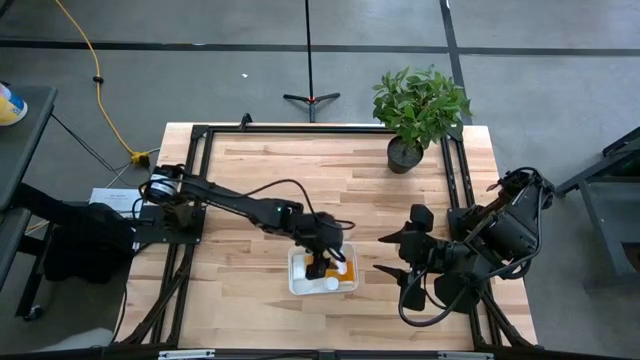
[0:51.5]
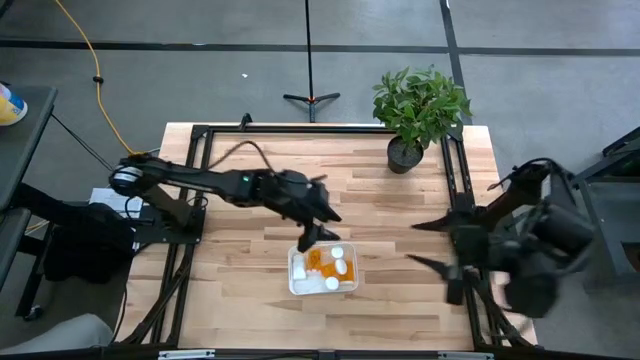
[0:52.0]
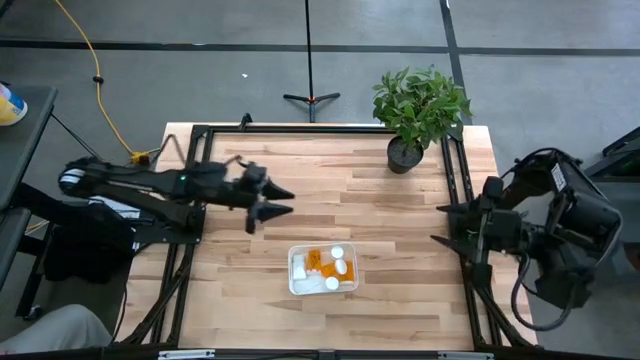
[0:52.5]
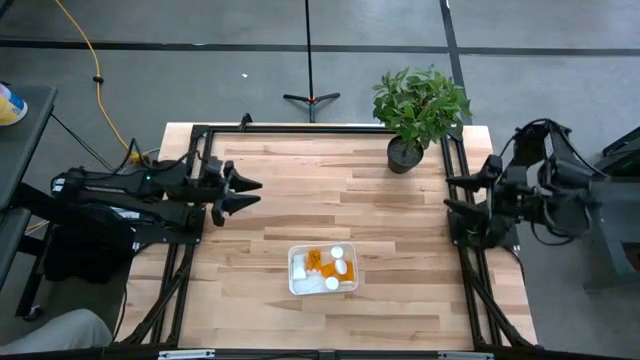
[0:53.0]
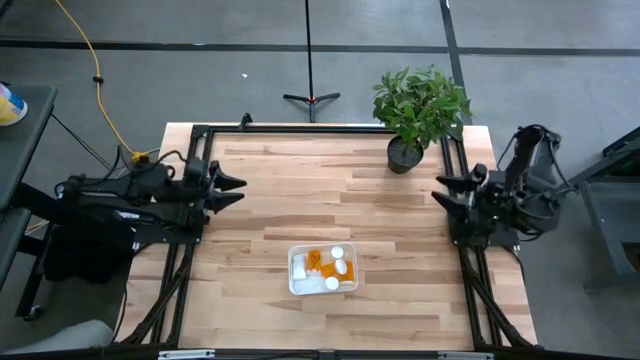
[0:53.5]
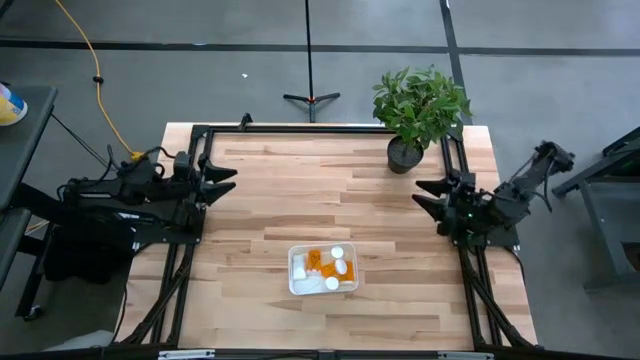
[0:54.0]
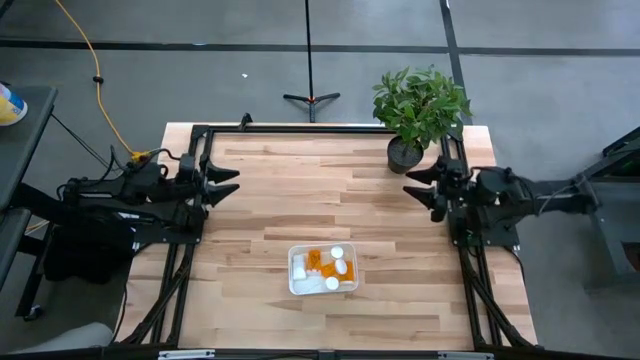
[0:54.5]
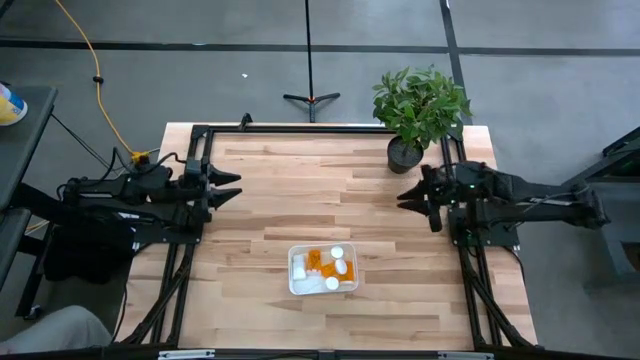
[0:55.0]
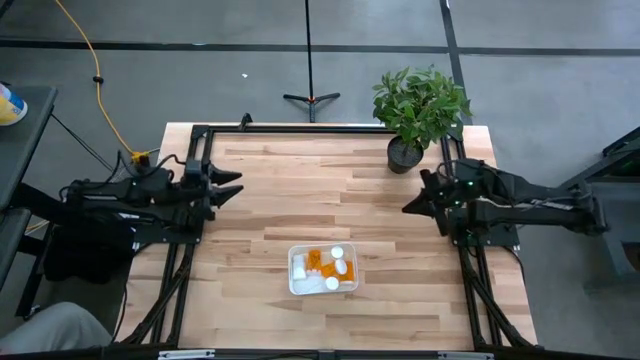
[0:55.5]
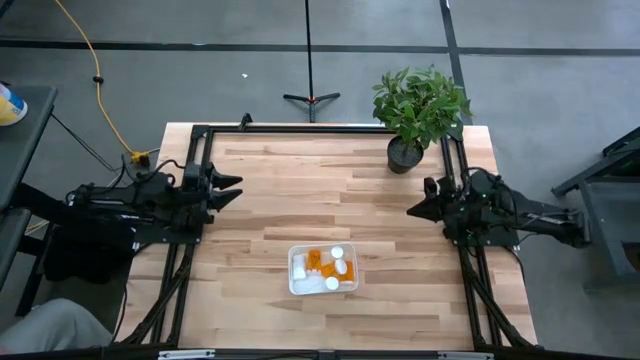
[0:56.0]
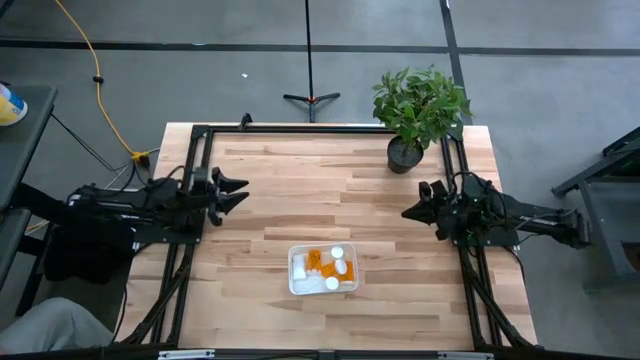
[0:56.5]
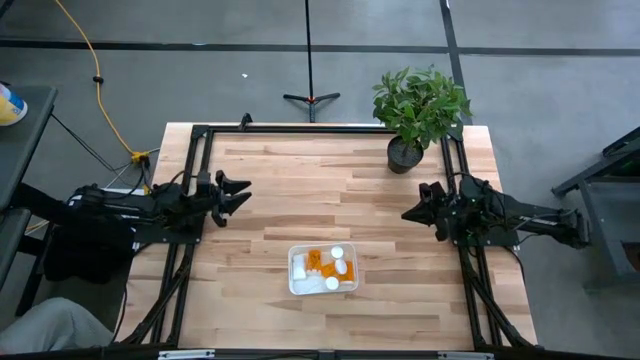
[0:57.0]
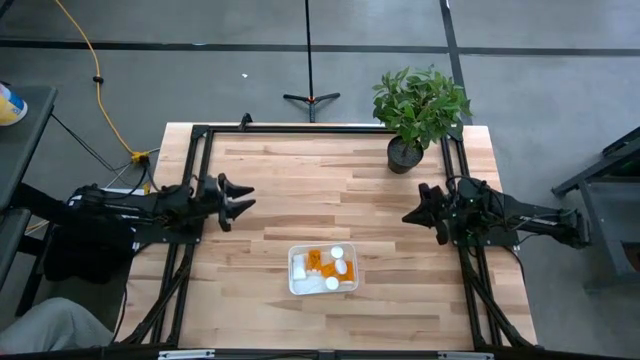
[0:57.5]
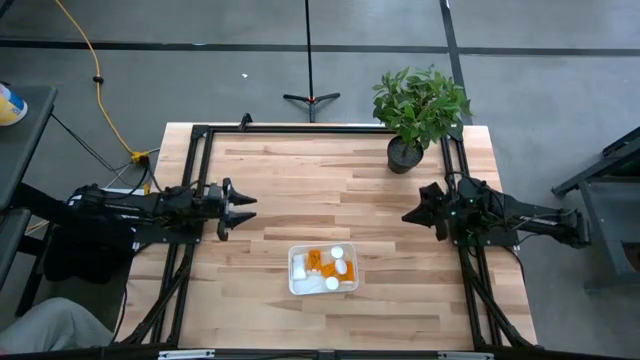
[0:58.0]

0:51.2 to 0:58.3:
Task: Pick and place pill bottles into a basket
Return to Home Position

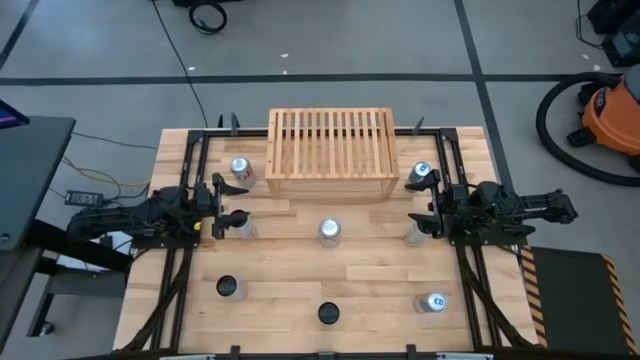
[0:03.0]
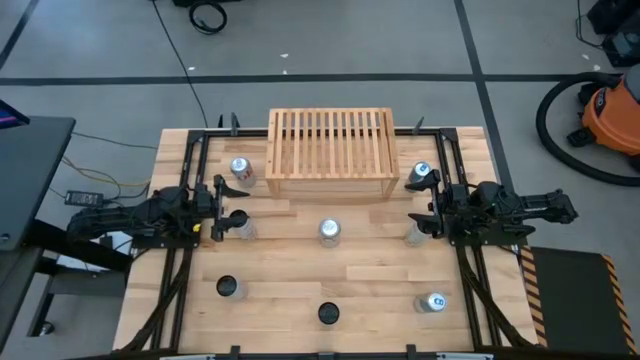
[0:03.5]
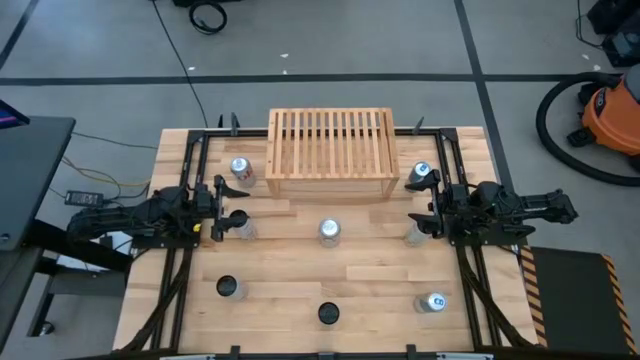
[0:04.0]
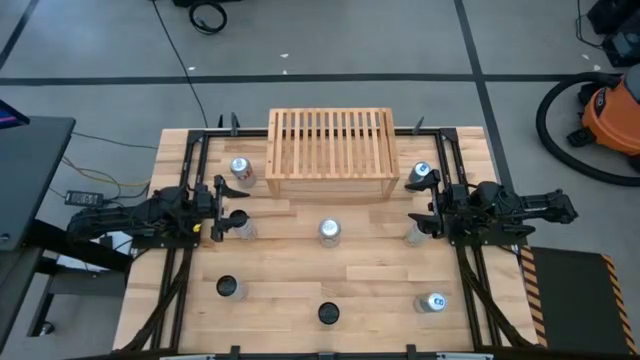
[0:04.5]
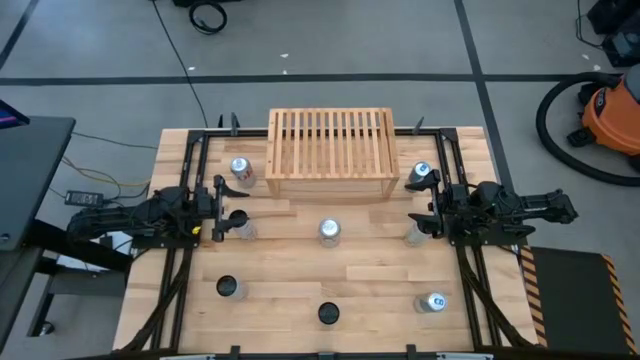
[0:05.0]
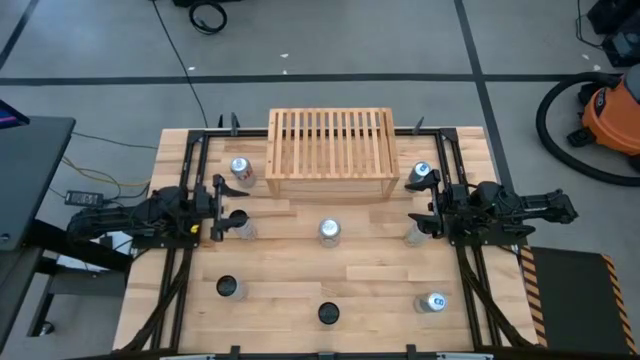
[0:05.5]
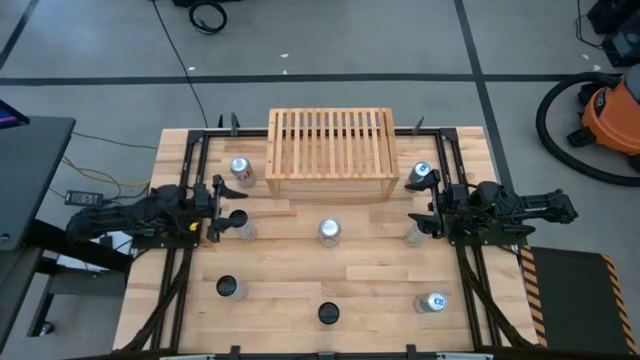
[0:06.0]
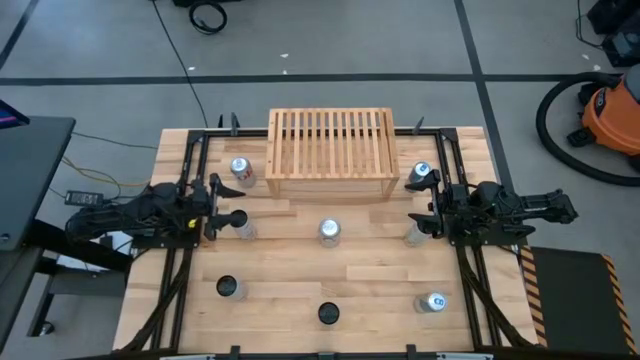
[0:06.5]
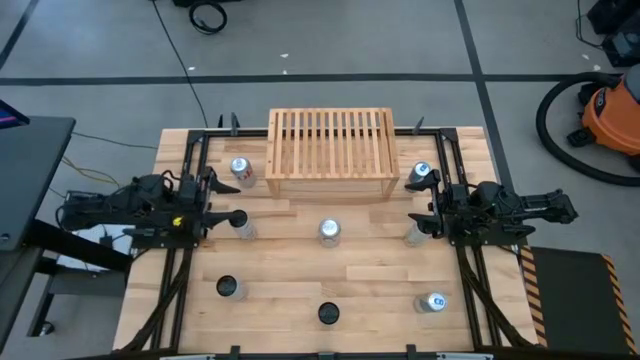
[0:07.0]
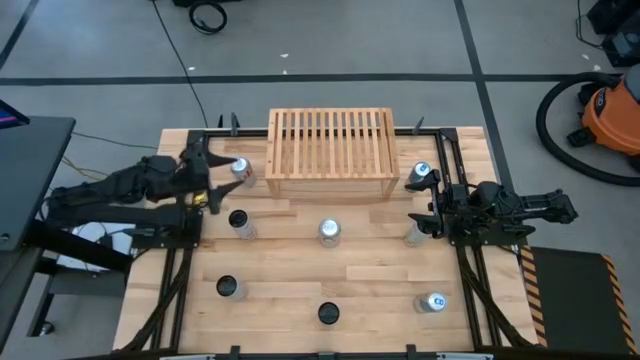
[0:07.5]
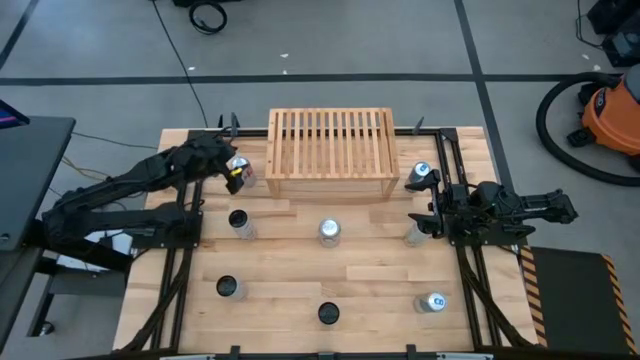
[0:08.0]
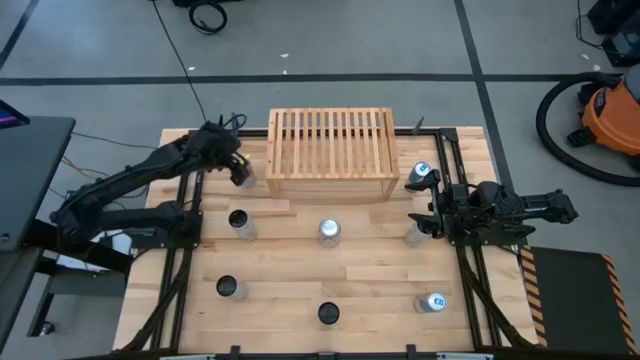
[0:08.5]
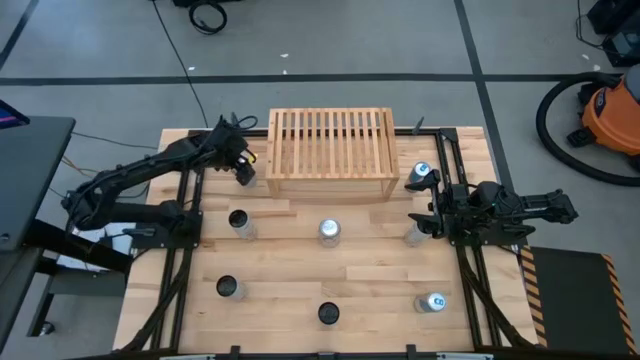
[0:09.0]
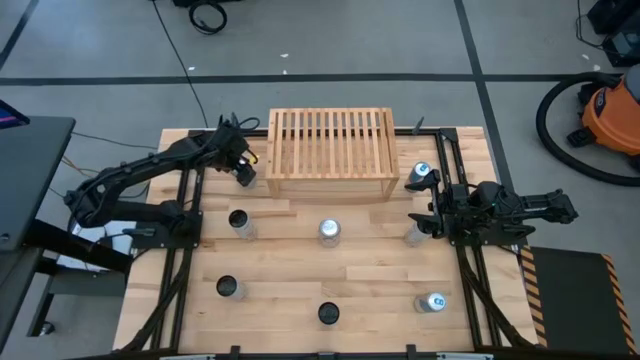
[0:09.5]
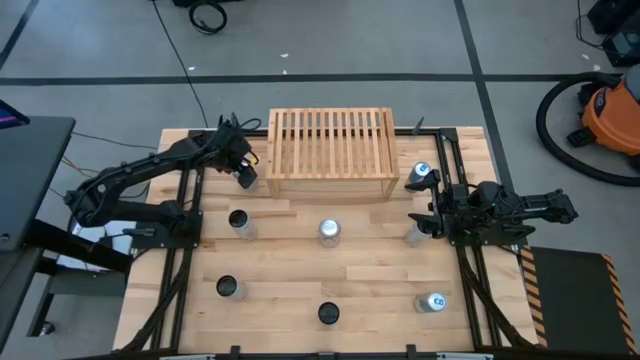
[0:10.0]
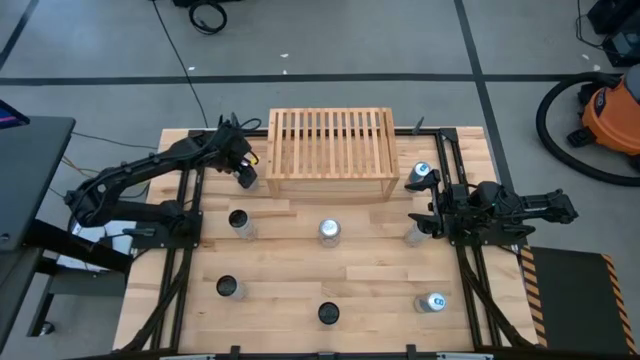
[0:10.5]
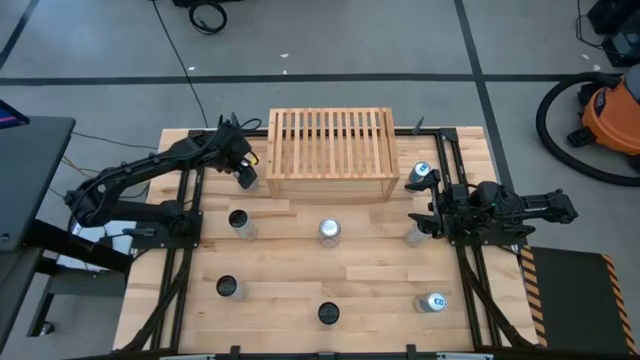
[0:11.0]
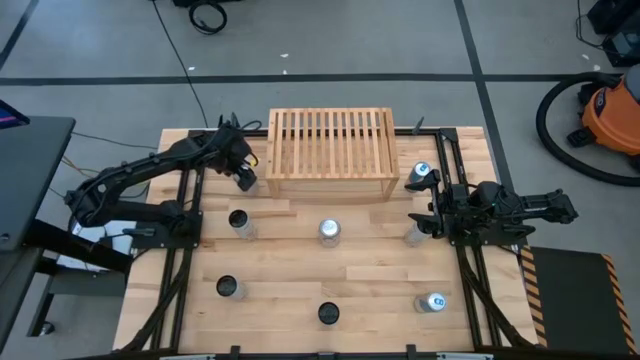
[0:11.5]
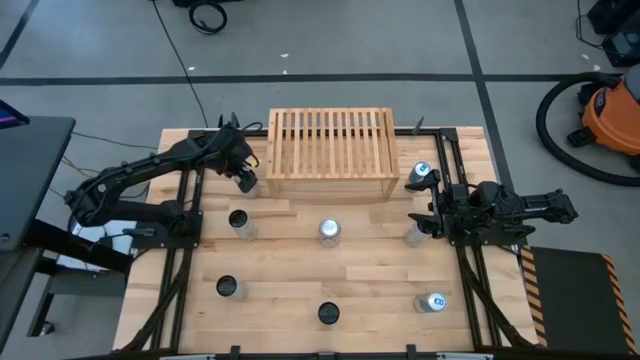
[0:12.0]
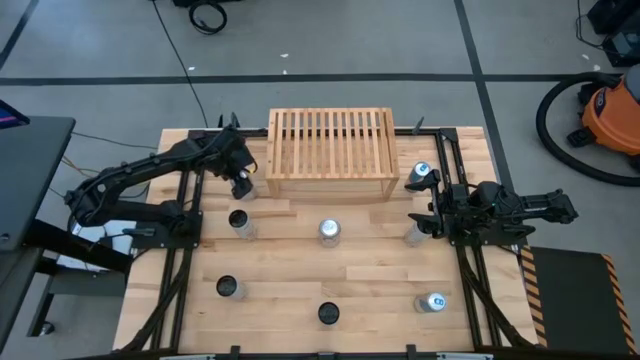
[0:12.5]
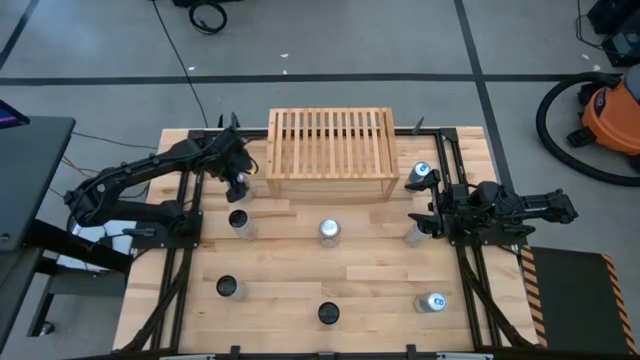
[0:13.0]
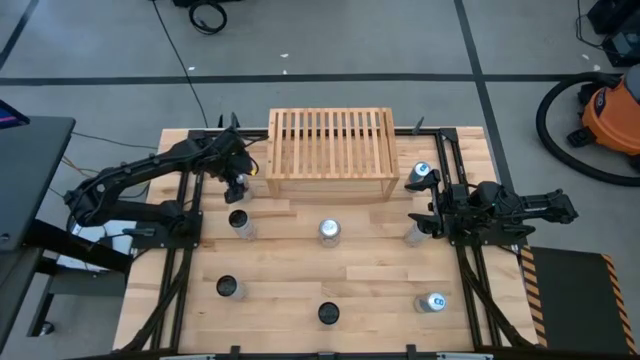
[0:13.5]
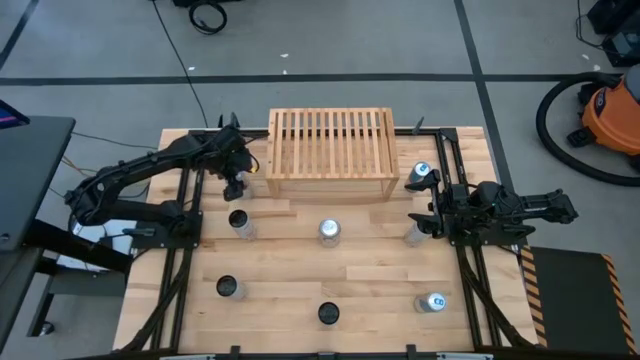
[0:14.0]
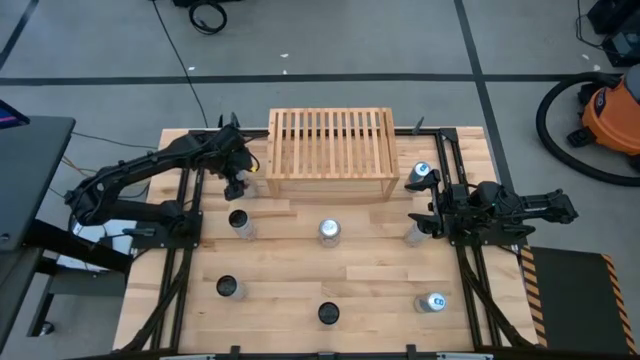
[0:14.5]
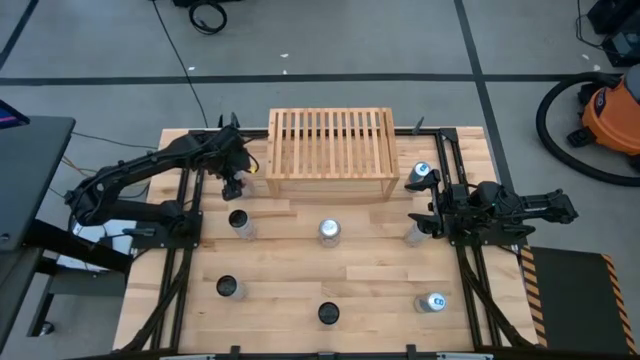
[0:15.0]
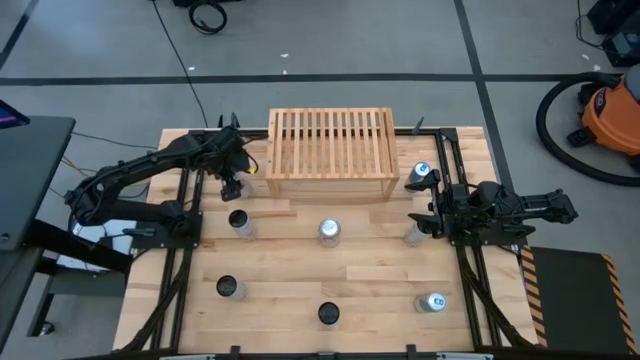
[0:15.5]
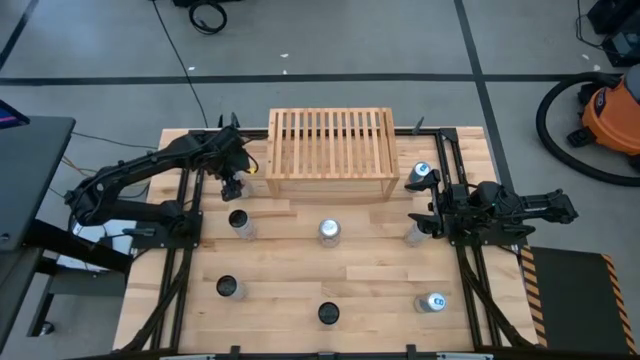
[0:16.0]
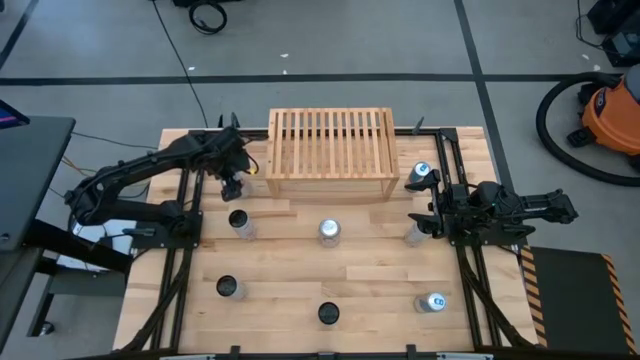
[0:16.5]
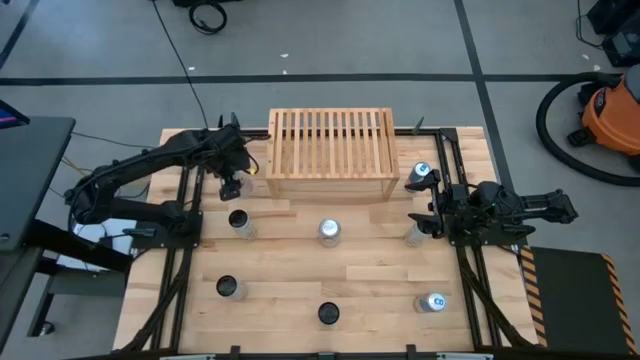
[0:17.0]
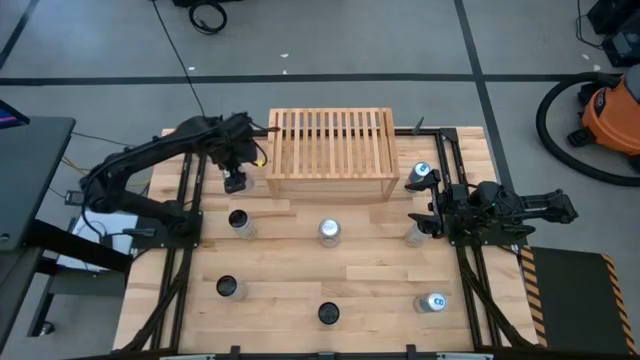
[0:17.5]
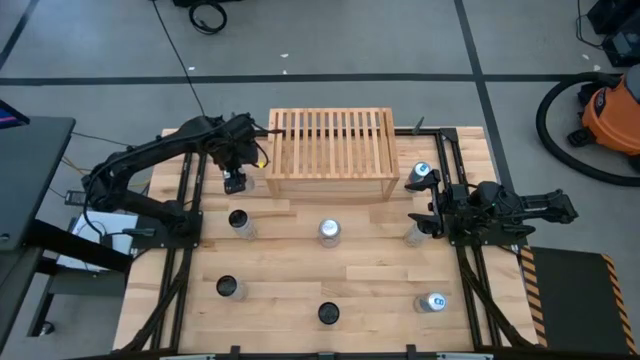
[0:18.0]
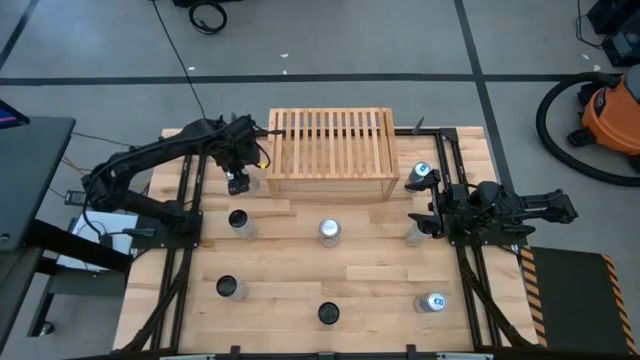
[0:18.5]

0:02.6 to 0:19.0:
Task: Place canned beverage on shelf
Put the top red-silver soda can on the shelf
